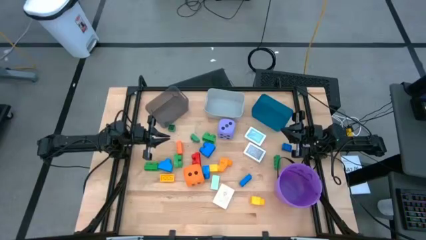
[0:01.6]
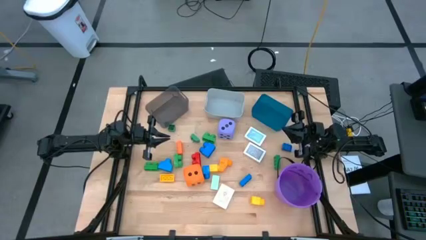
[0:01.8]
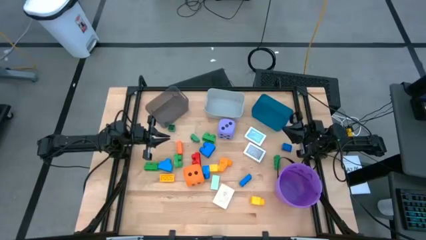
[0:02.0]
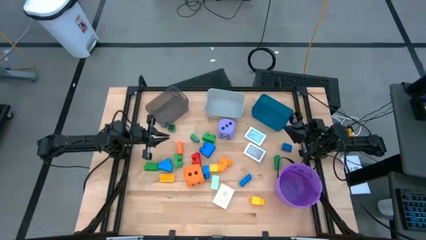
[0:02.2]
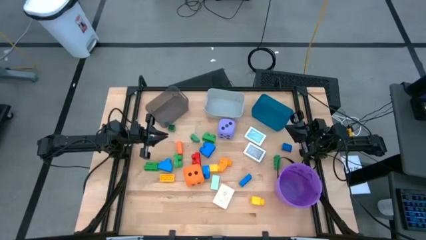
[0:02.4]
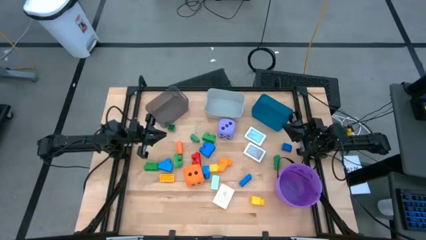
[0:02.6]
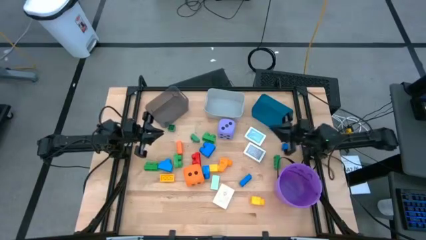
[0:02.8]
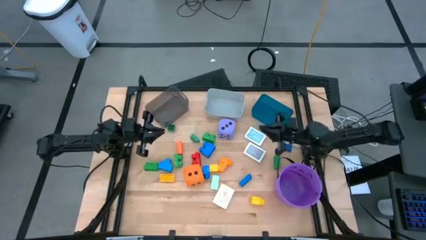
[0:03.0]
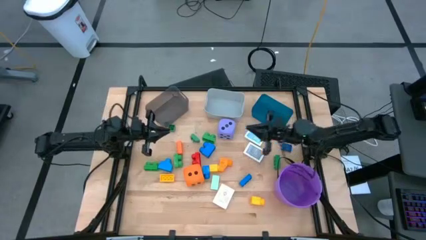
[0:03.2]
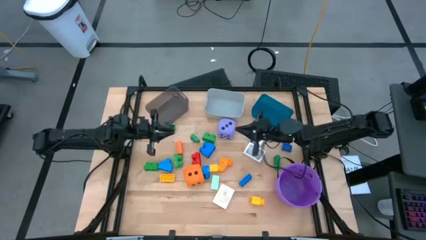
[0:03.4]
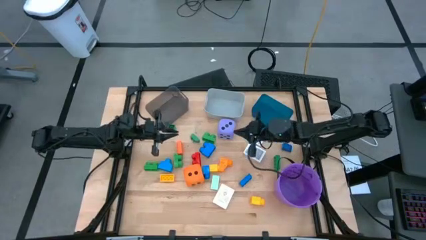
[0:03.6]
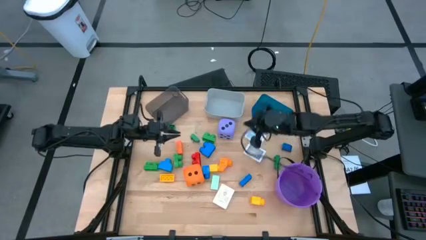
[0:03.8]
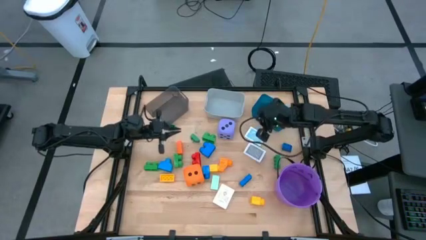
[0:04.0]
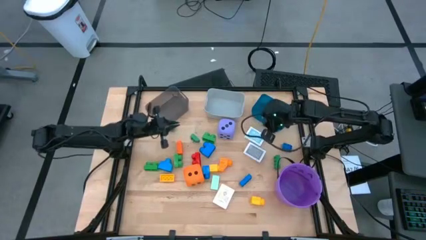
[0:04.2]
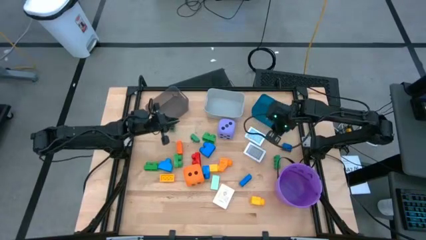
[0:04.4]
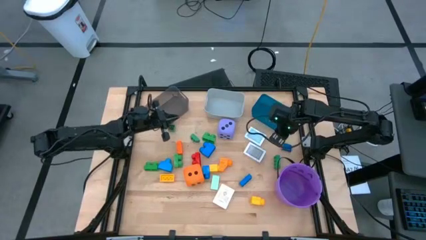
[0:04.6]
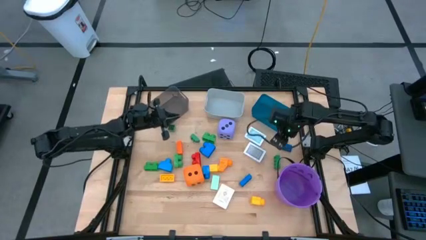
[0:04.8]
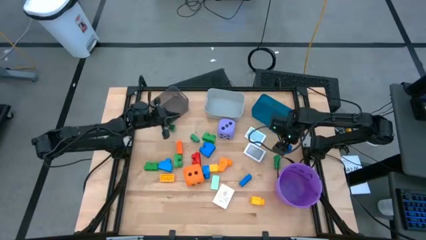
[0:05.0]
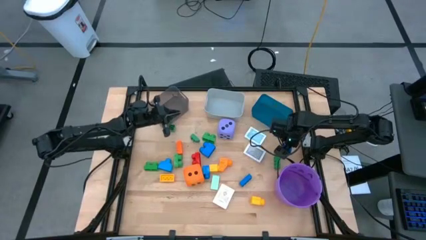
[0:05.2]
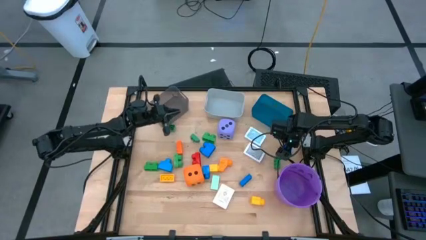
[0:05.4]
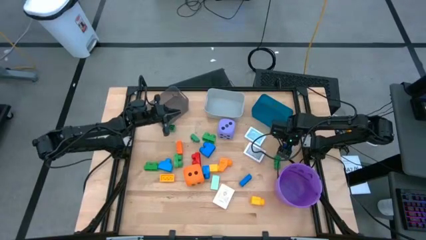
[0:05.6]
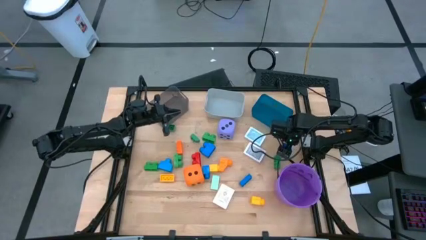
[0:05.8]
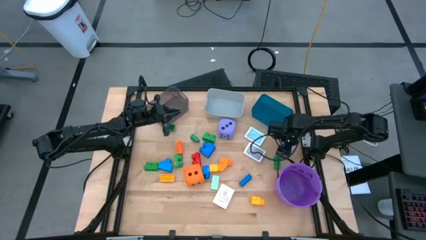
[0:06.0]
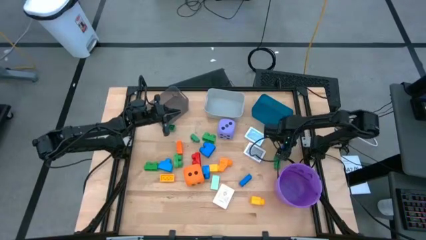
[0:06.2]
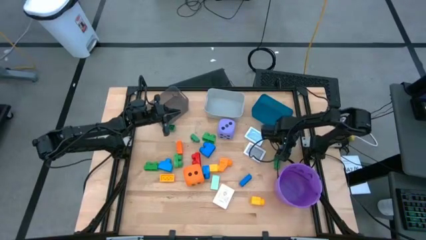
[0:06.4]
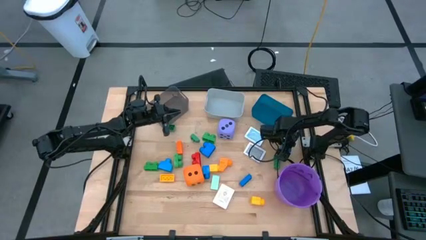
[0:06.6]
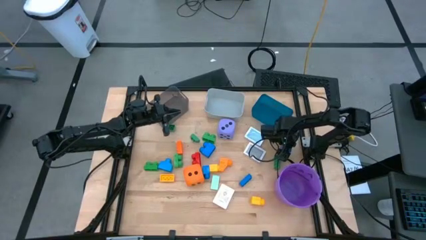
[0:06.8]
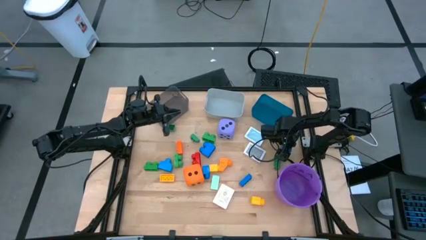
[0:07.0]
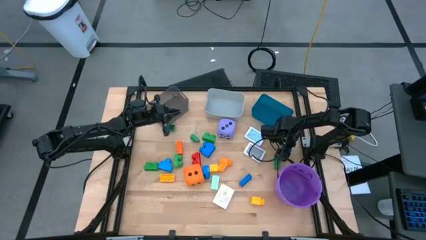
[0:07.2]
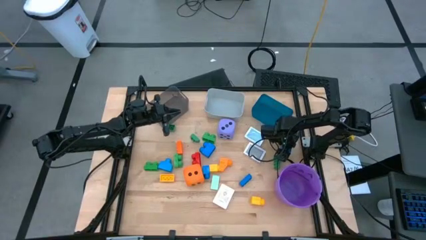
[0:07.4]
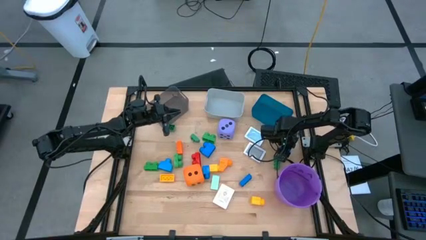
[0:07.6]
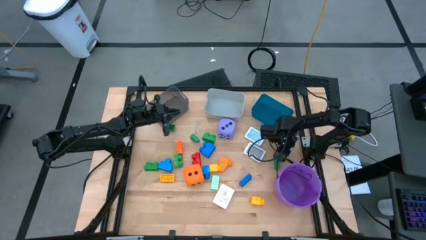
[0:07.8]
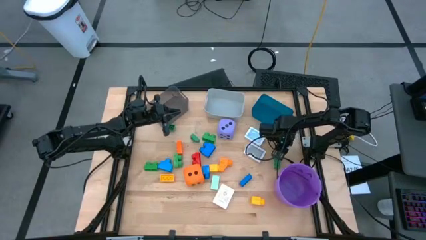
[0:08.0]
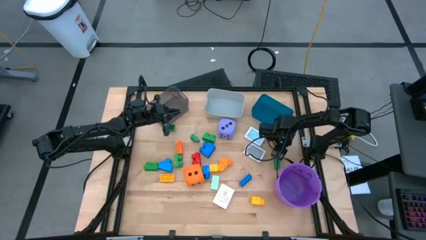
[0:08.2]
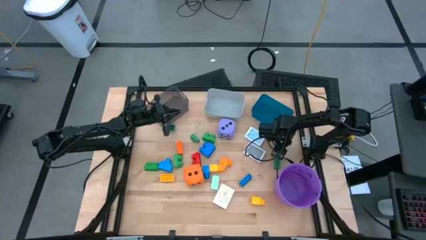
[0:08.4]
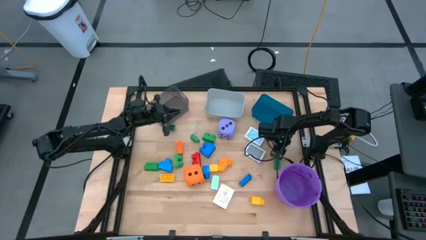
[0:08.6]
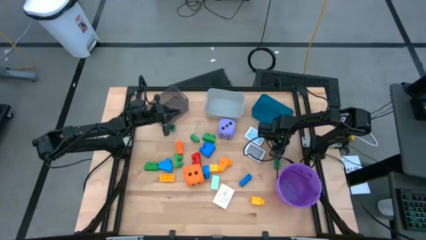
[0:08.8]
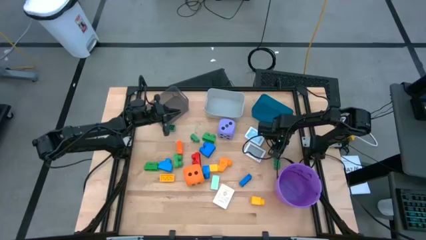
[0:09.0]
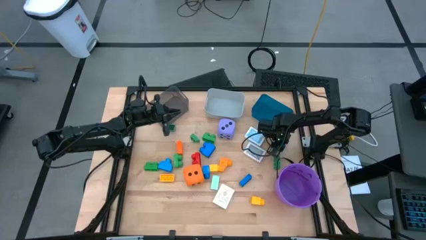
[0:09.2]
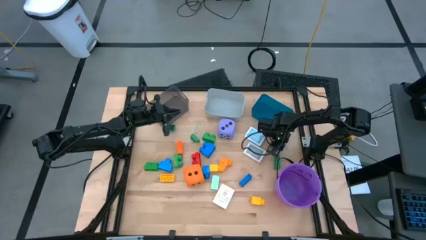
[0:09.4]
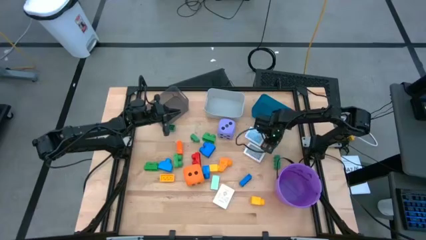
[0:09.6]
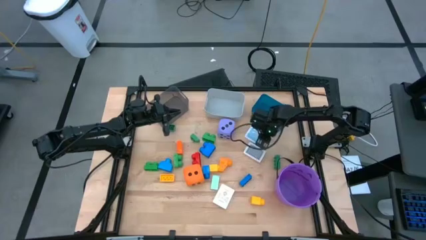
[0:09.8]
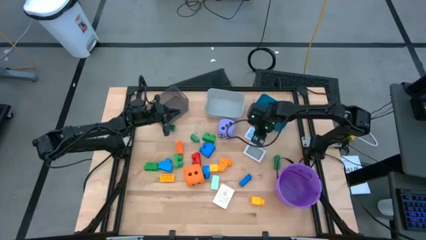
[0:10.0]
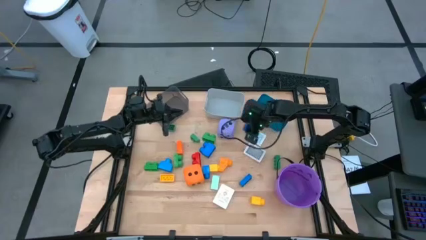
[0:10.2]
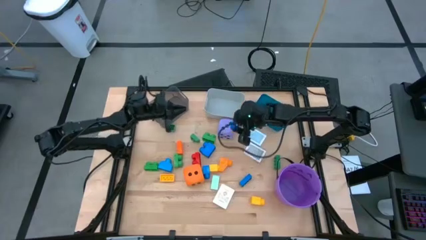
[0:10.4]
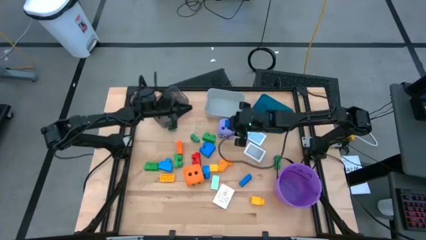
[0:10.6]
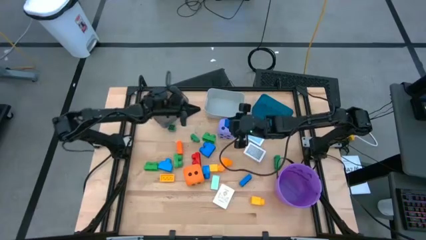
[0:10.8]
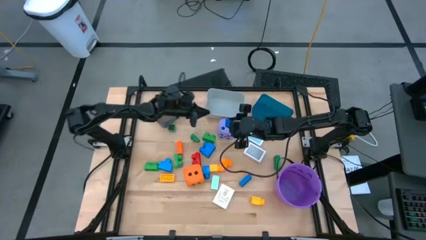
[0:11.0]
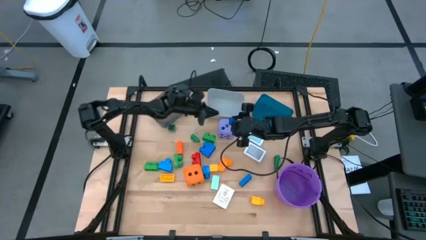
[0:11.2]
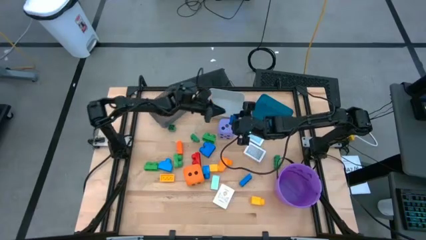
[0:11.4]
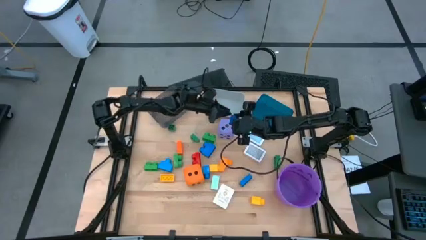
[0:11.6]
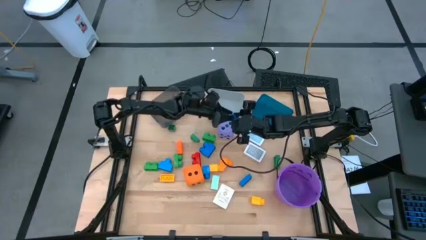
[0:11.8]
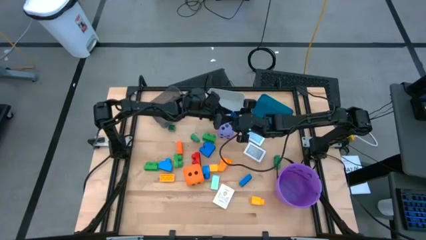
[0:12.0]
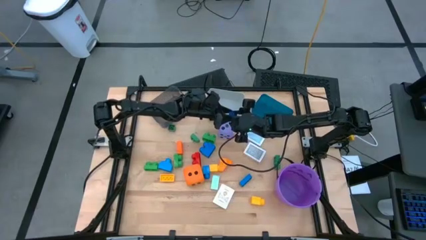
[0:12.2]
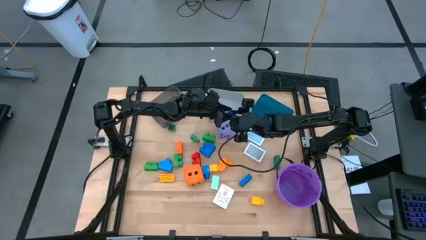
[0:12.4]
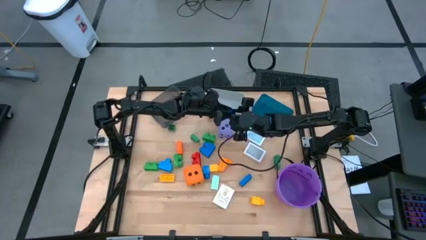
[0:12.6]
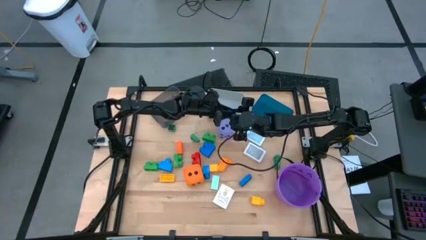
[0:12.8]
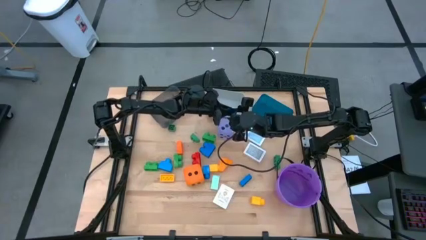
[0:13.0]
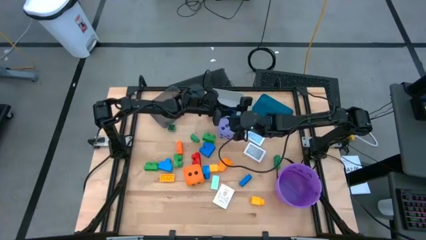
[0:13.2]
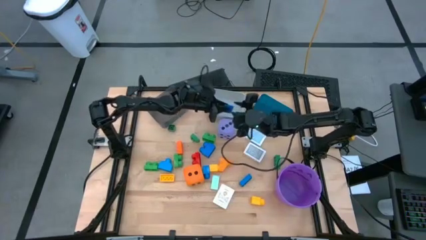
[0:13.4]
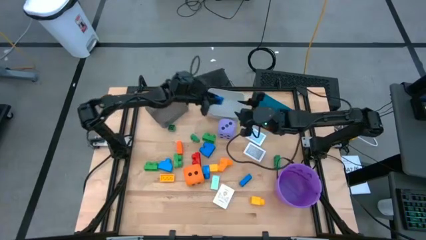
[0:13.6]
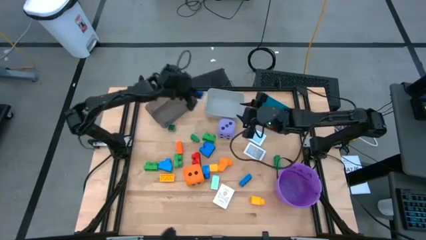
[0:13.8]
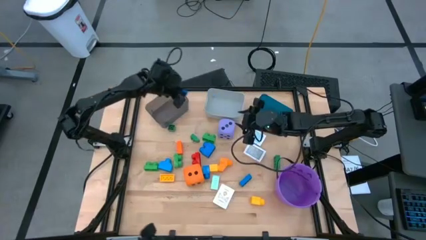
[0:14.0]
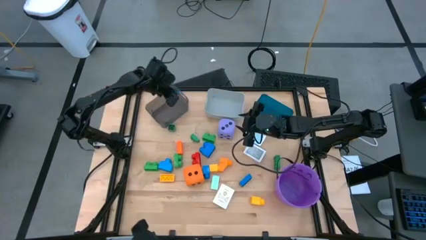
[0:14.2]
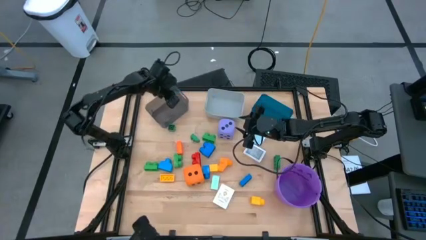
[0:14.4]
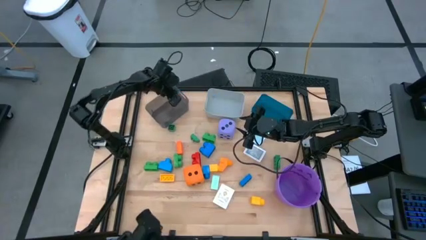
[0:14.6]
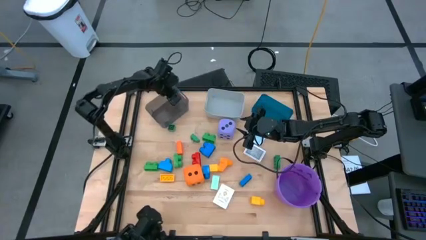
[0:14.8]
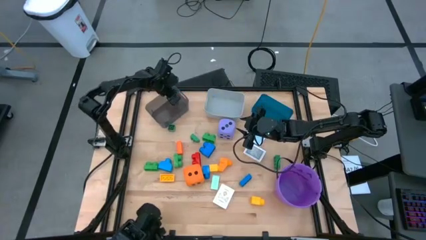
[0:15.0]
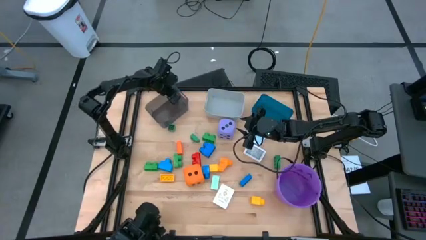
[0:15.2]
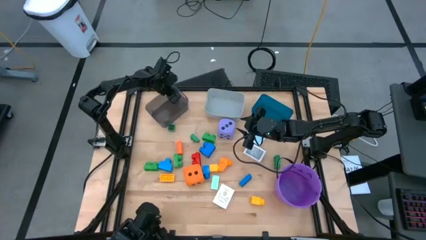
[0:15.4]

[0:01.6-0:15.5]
Task: Pick & Place Toys
Put the blue gamepiece into the black bin

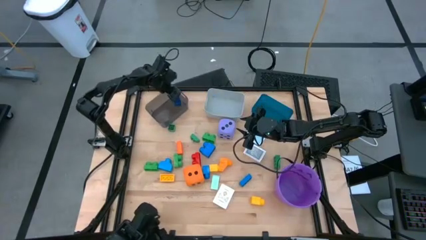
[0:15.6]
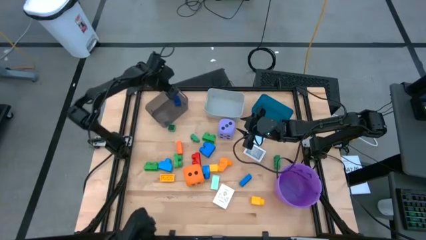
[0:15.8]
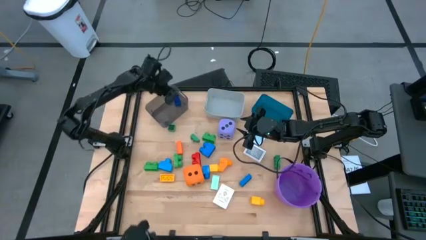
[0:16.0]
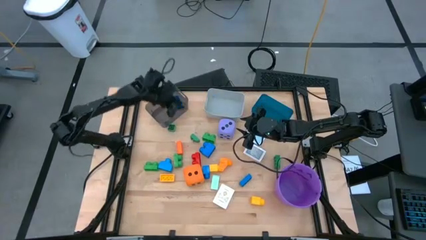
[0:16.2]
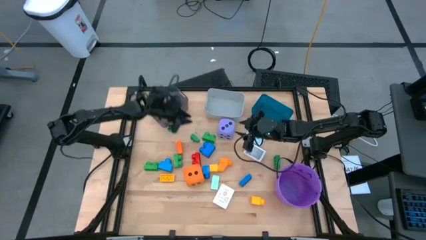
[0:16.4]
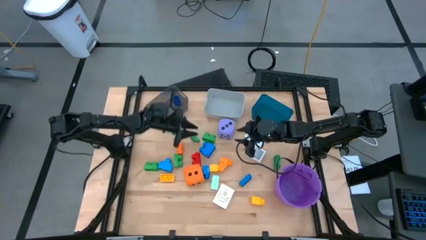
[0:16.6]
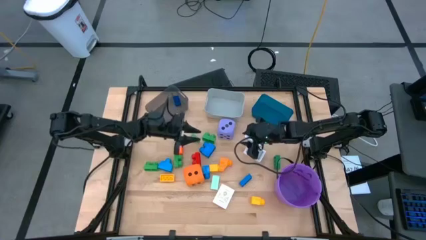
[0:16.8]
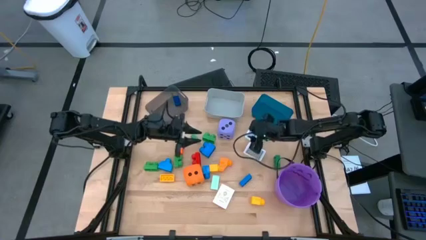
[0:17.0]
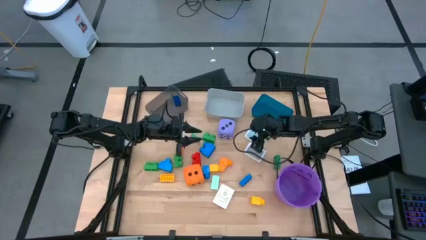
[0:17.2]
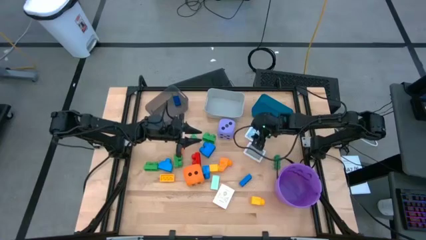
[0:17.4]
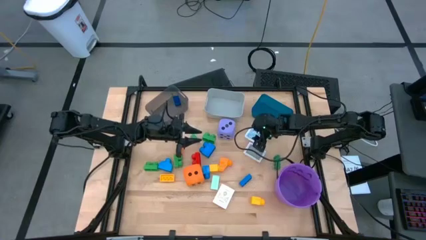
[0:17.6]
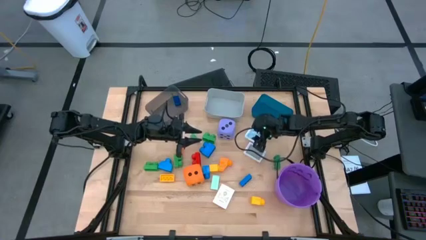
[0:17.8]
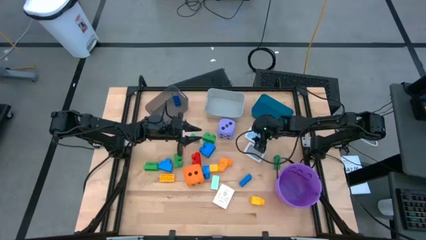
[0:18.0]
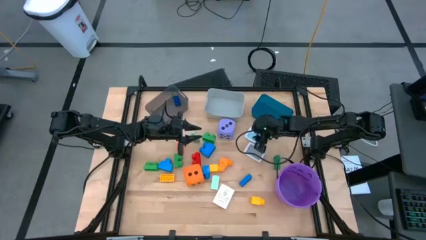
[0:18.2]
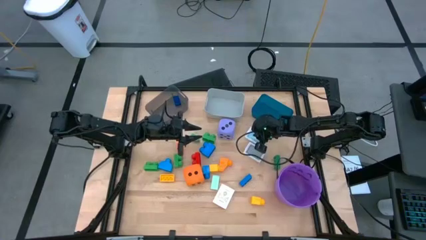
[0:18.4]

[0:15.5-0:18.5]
Put the blue deck of cards into the blue bin
